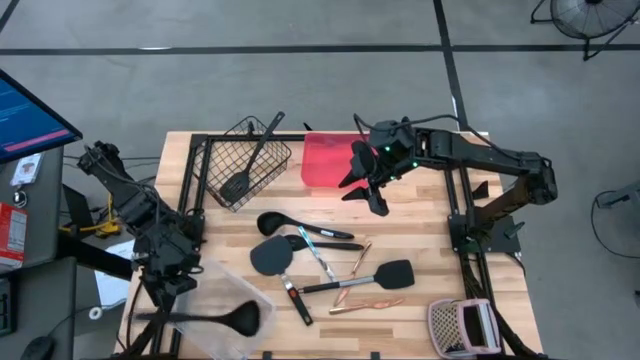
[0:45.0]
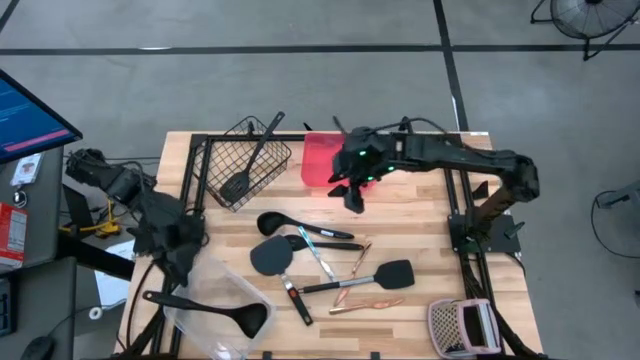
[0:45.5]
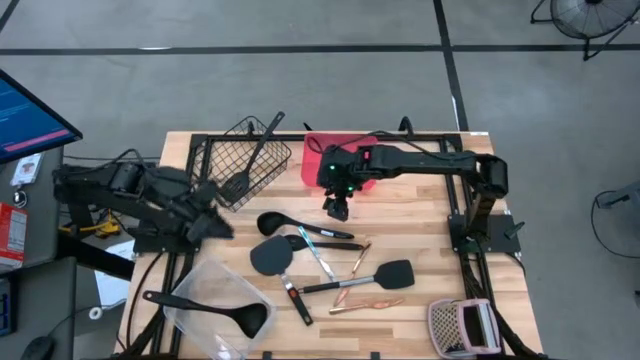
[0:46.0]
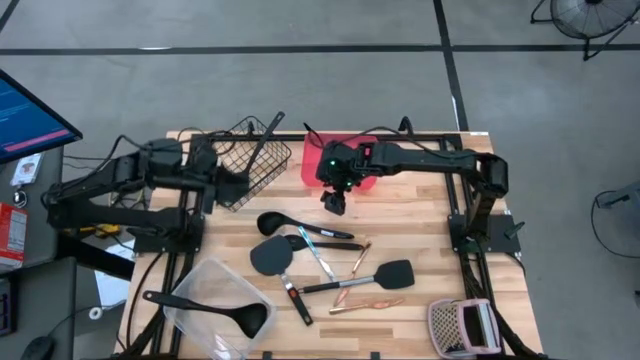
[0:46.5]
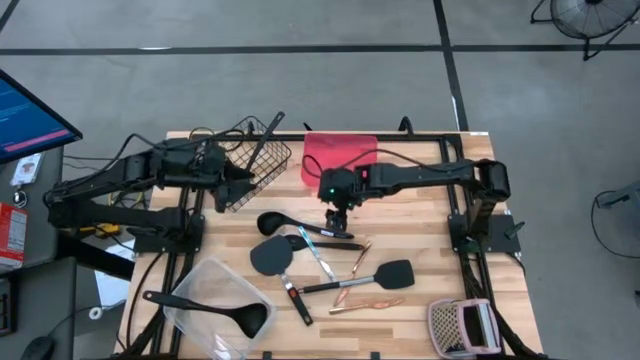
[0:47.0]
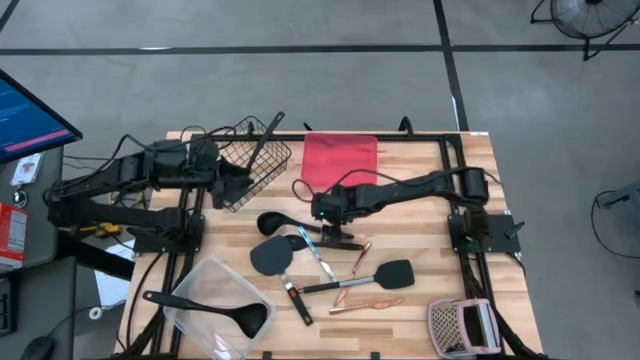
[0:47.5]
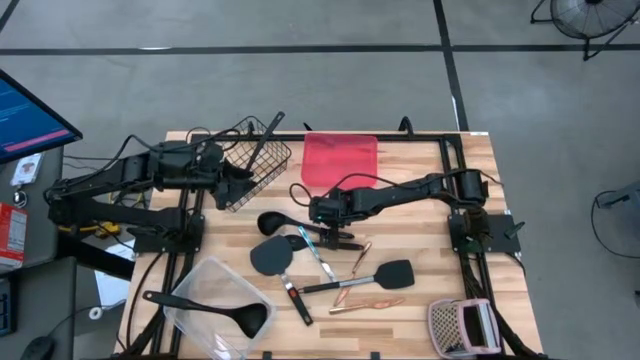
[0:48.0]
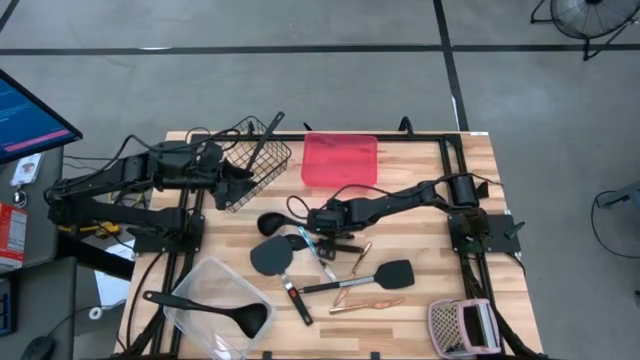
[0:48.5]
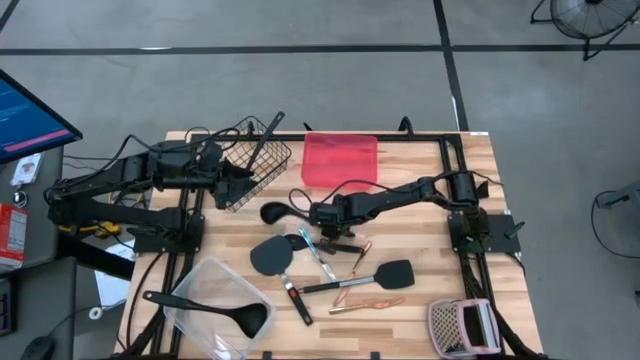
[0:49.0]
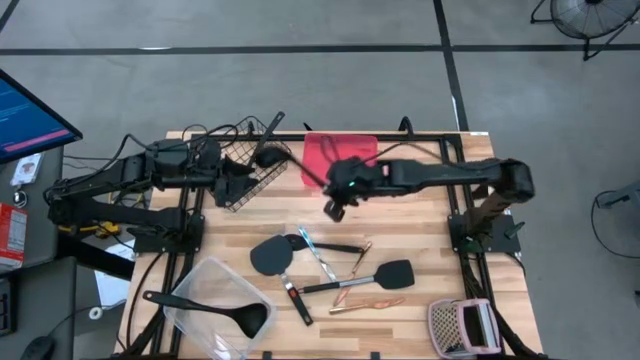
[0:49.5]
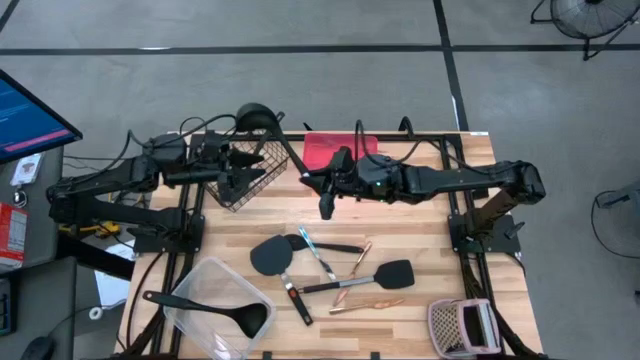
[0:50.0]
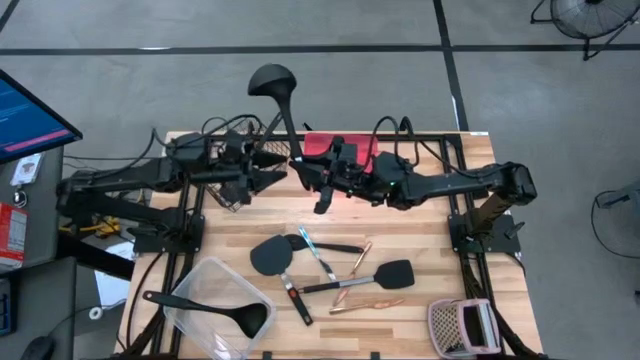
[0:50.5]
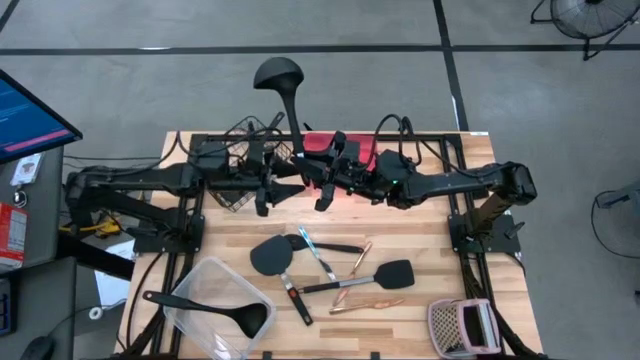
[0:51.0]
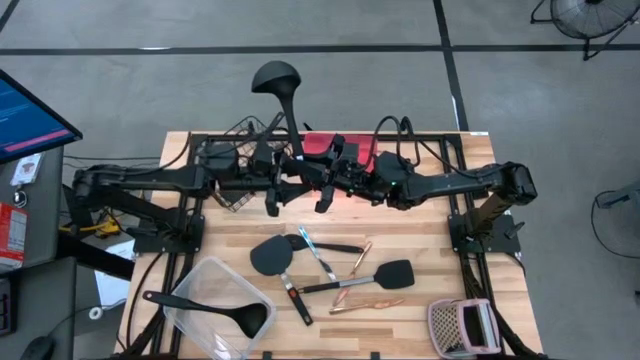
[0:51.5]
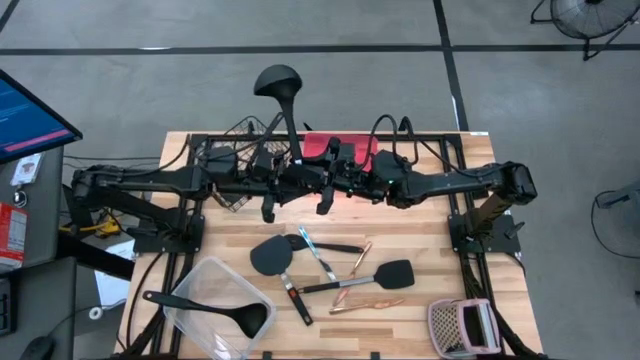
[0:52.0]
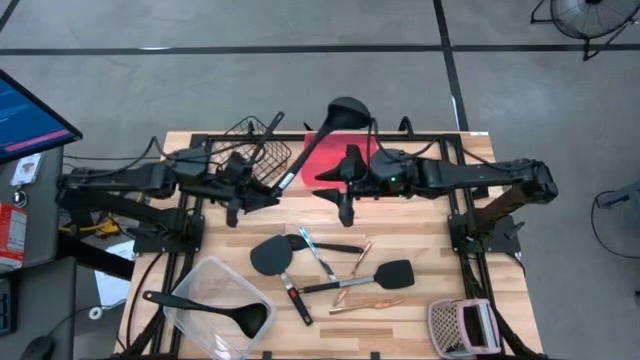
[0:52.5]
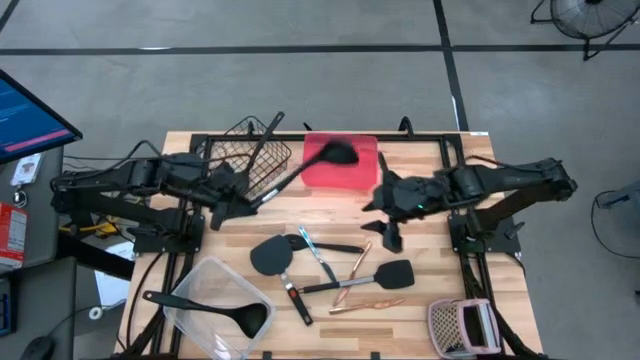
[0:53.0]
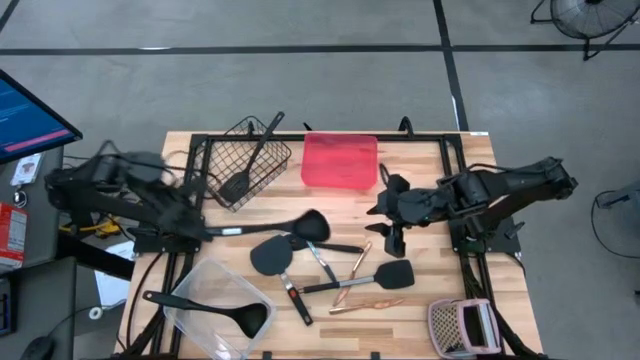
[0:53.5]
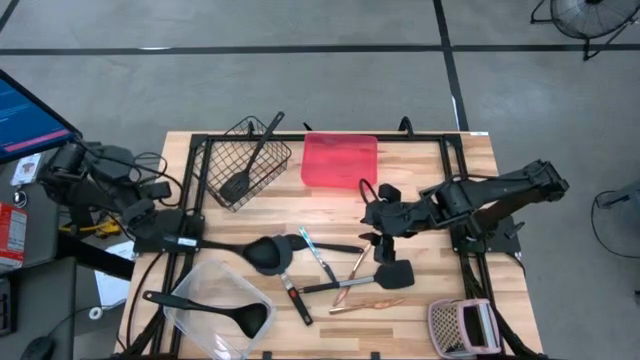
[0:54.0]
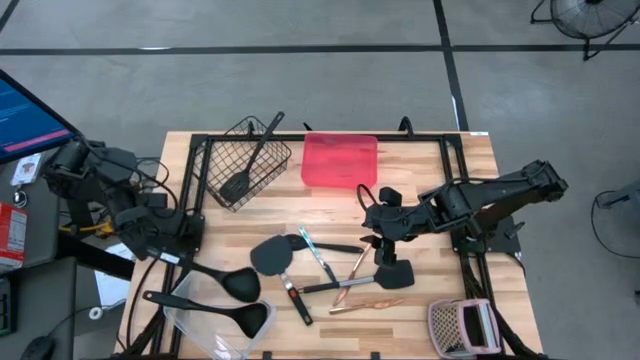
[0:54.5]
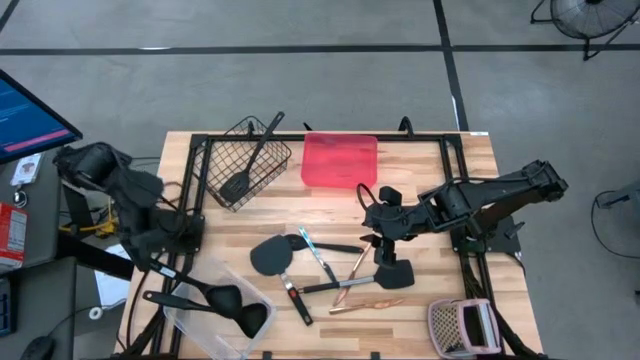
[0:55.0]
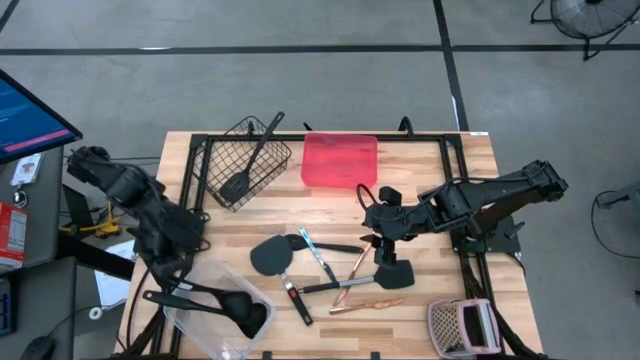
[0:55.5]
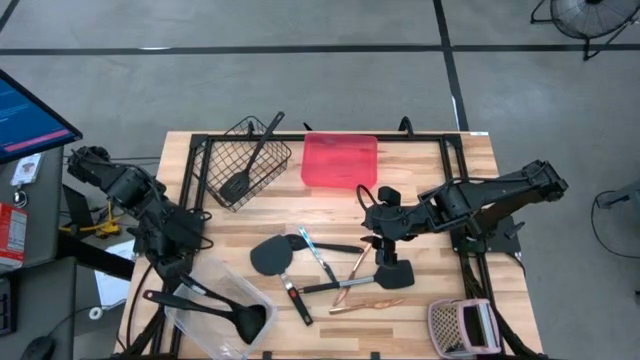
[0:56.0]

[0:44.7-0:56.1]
Task: Pick & Place Kitchen Items
Put the soup ladle into the white bin

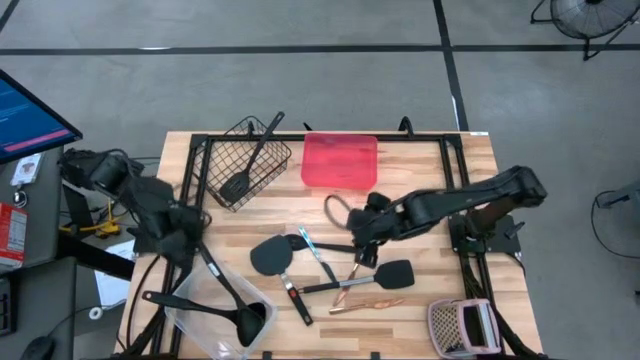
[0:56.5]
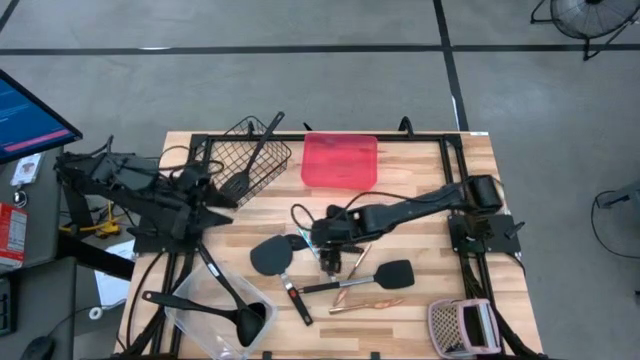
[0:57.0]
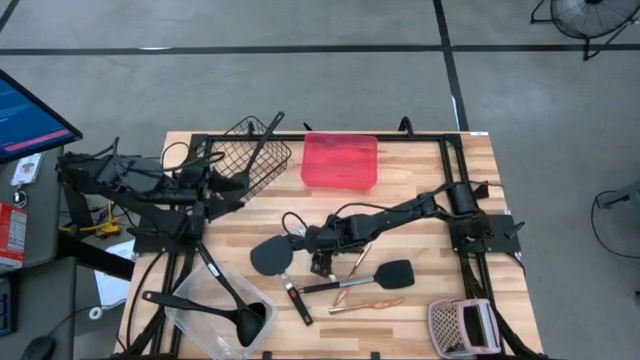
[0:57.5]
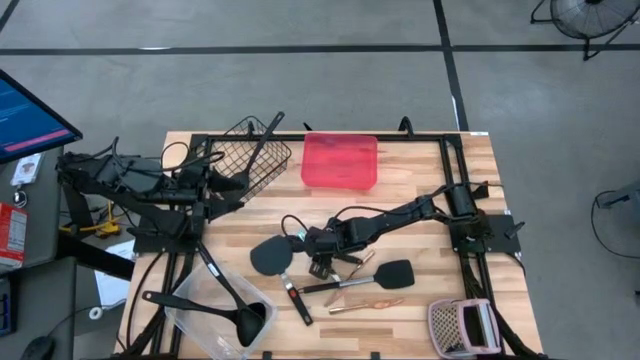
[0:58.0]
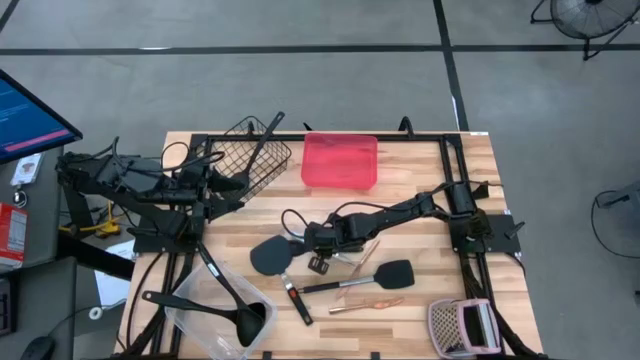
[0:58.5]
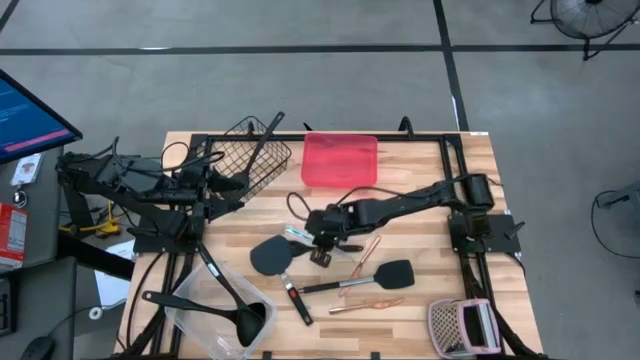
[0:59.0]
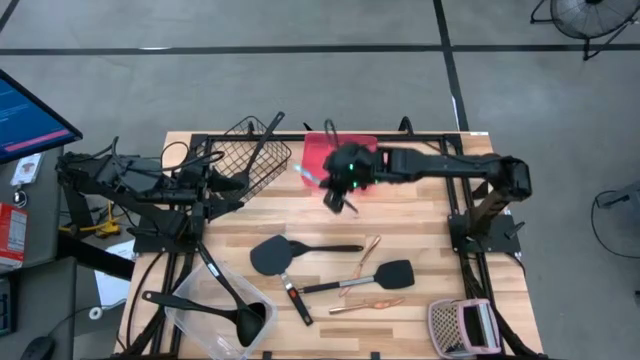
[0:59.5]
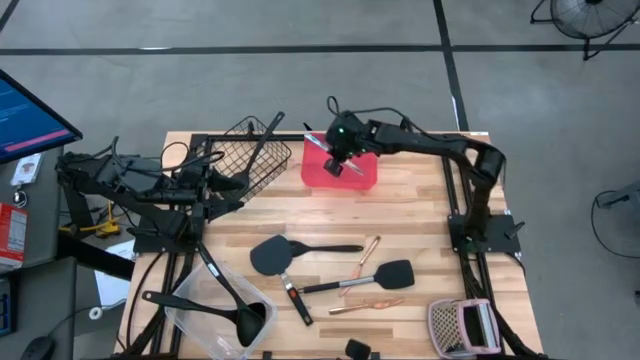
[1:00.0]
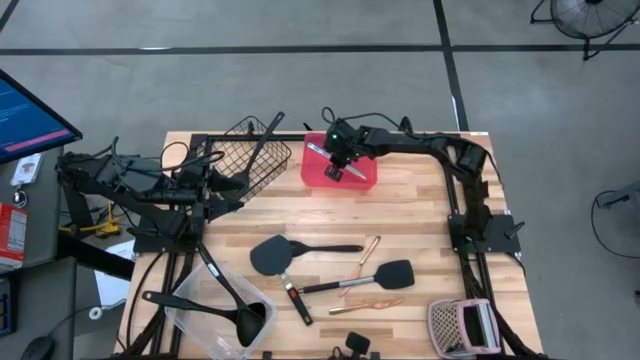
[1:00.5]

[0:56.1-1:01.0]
Put the blue pattern table knife into the red bin

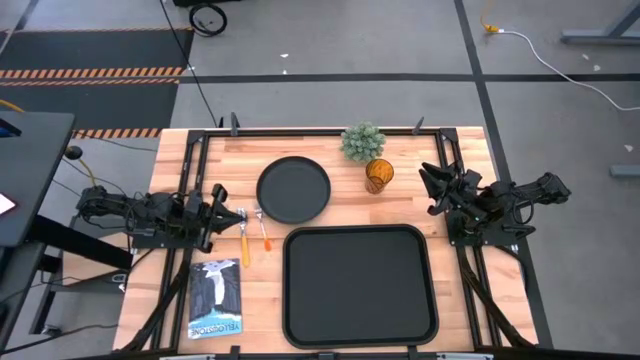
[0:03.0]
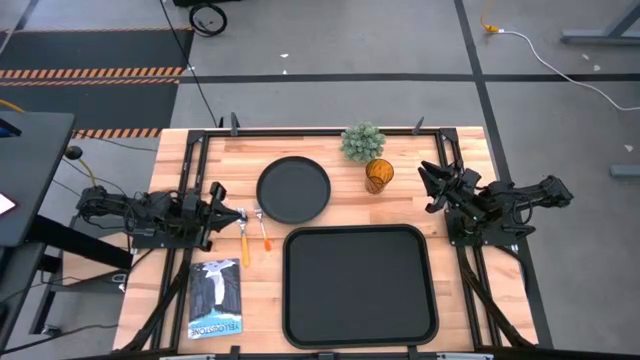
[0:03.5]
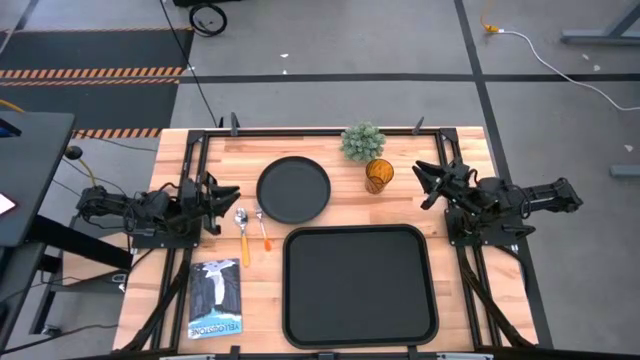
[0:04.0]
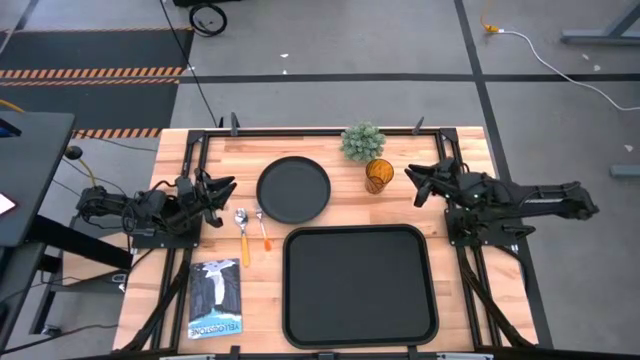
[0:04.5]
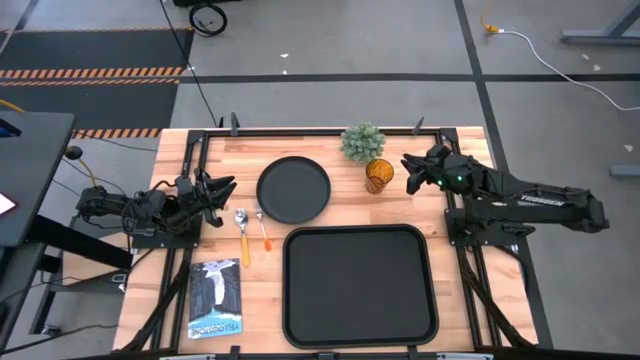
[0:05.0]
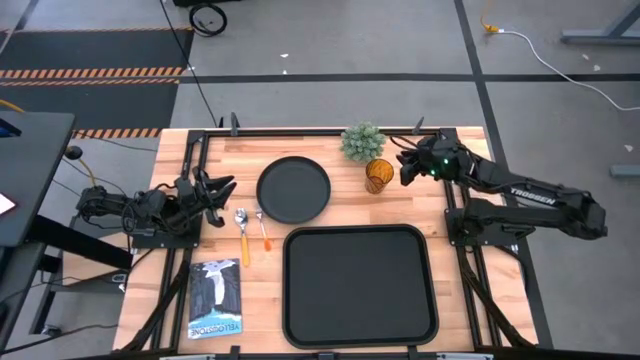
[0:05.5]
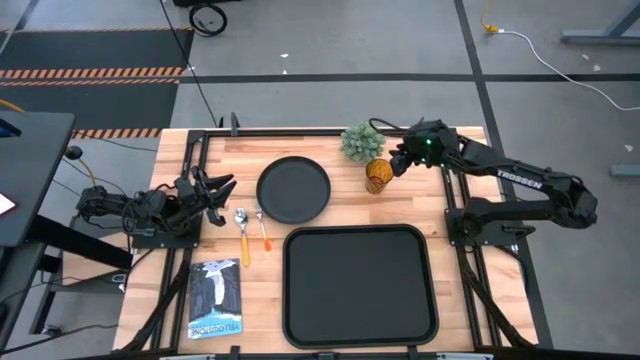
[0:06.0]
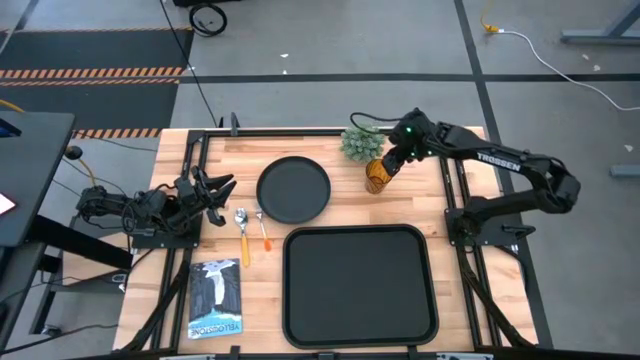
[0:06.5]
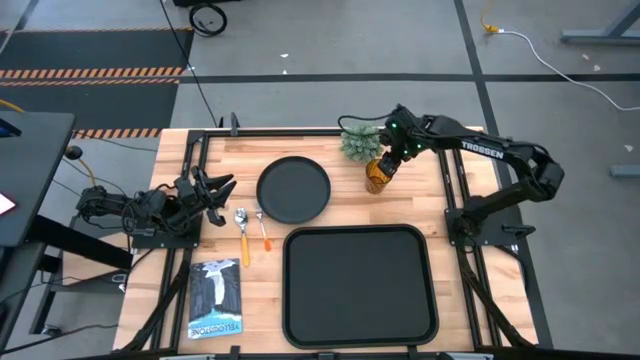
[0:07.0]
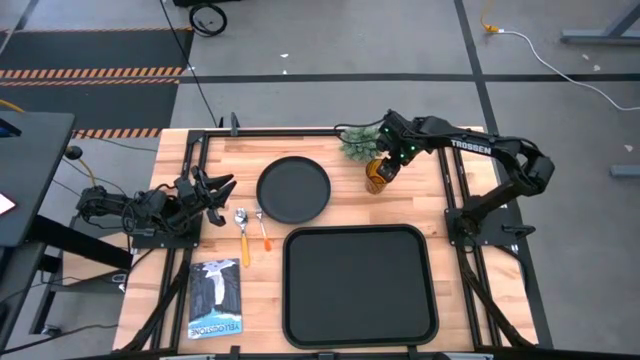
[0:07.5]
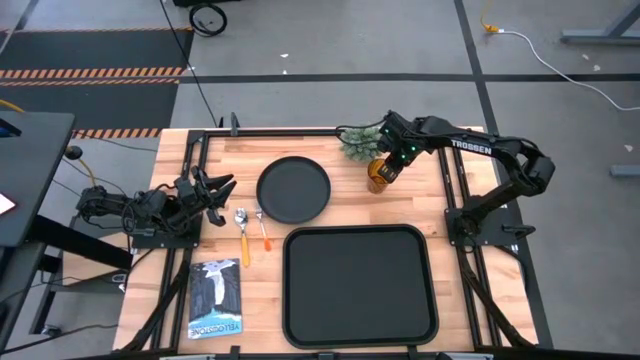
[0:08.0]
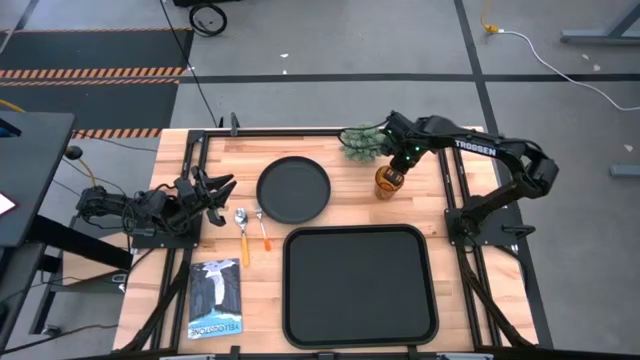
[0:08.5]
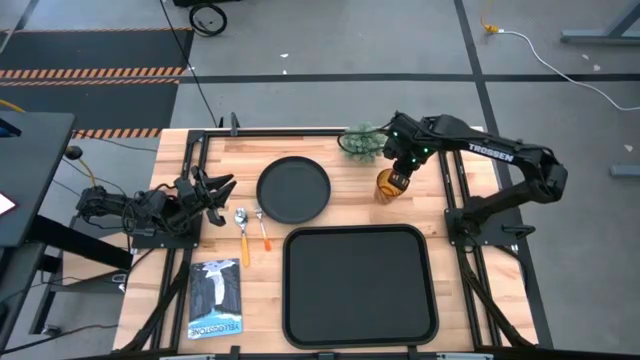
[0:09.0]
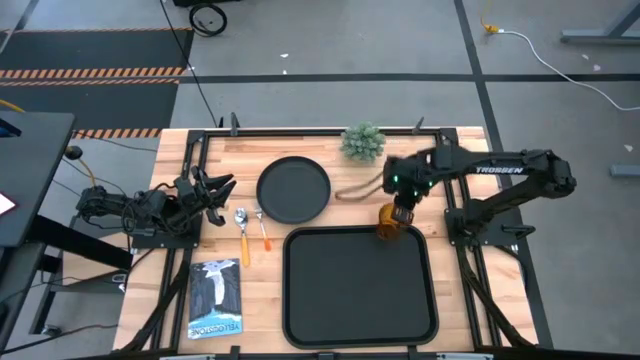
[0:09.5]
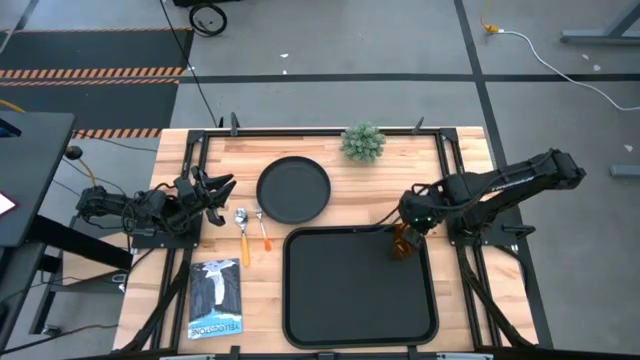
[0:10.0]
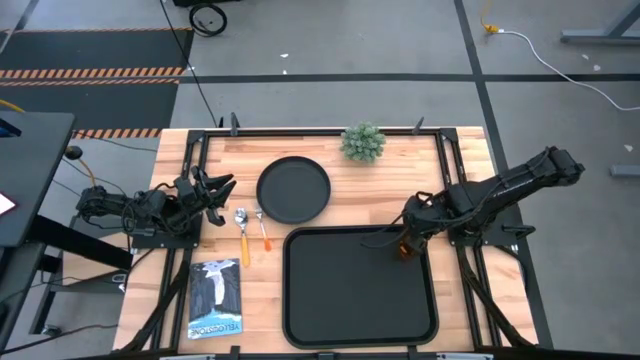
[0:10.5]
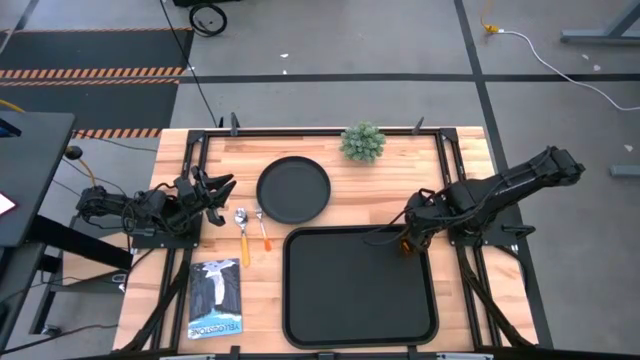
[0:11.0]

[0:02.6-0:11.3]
Task: Pick and place plate/cup/fork/spoon on tray
Put the brown cup on the top right of the black tray
